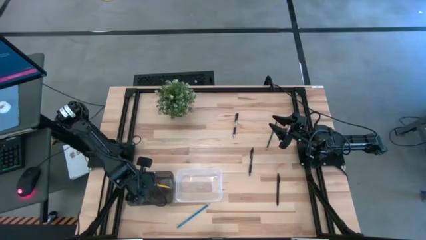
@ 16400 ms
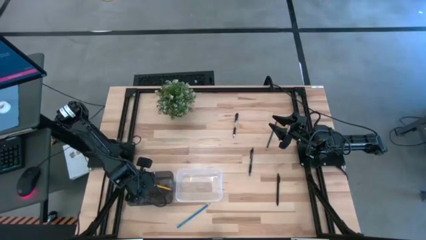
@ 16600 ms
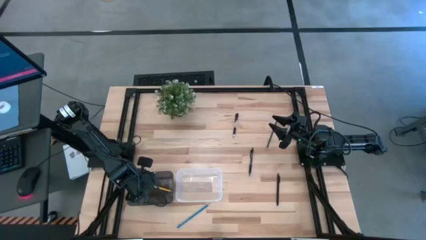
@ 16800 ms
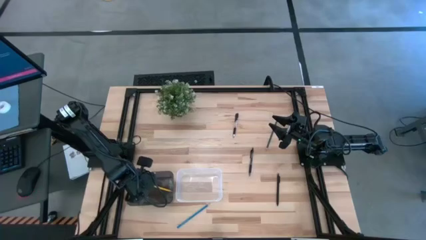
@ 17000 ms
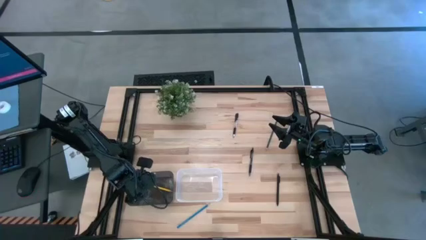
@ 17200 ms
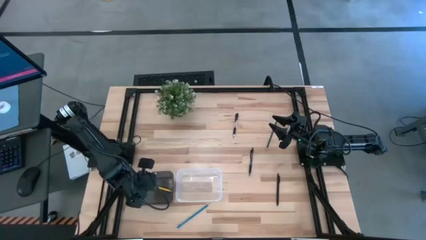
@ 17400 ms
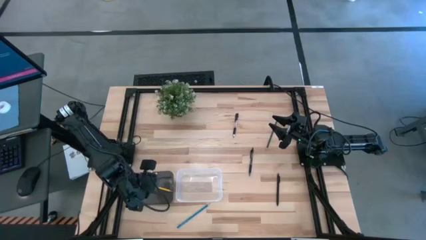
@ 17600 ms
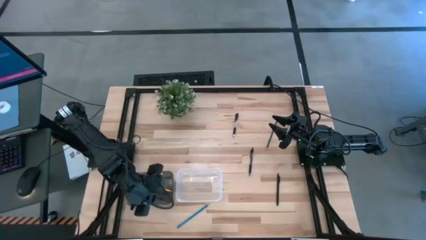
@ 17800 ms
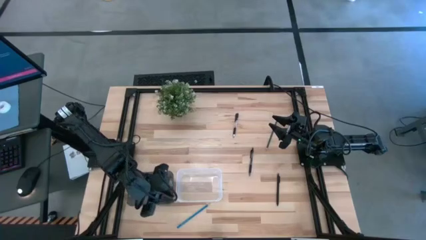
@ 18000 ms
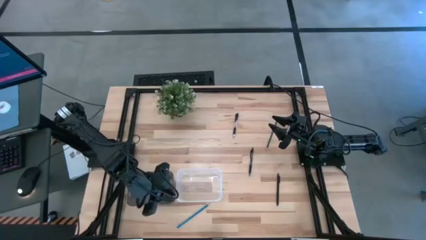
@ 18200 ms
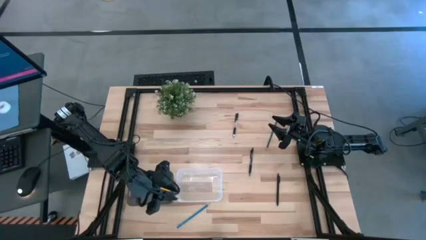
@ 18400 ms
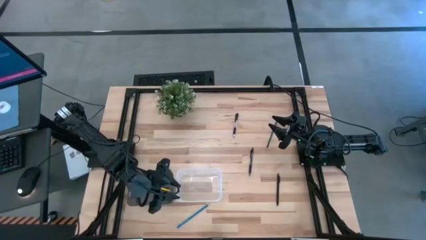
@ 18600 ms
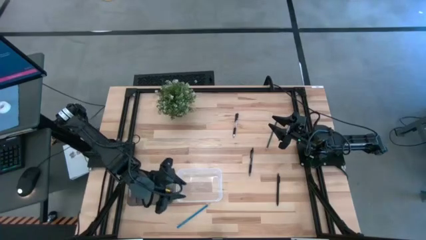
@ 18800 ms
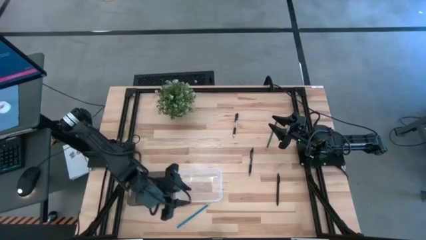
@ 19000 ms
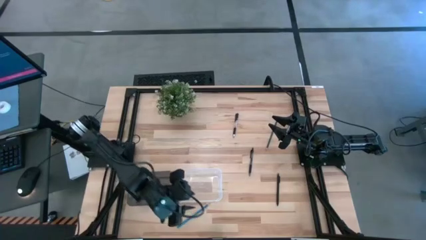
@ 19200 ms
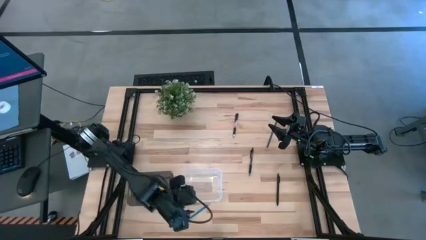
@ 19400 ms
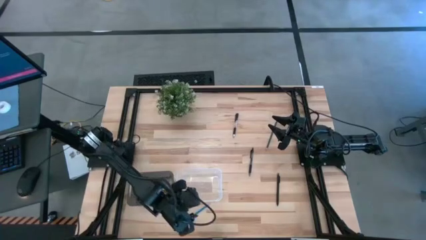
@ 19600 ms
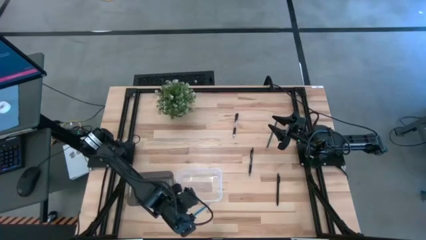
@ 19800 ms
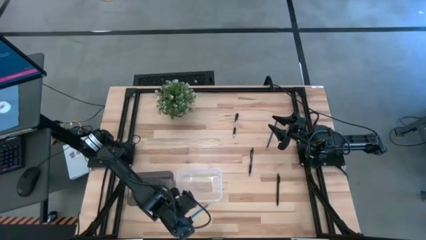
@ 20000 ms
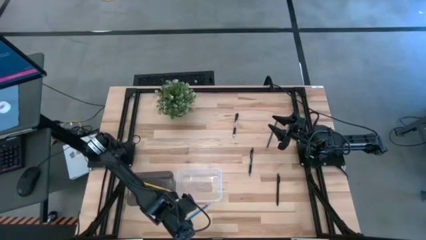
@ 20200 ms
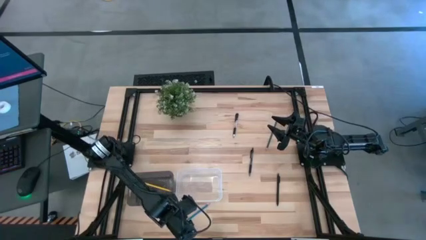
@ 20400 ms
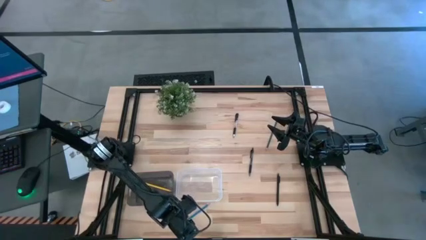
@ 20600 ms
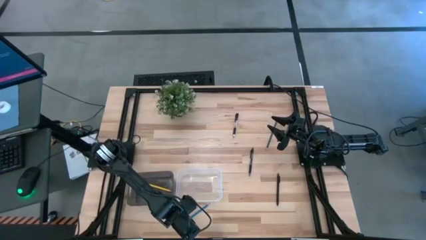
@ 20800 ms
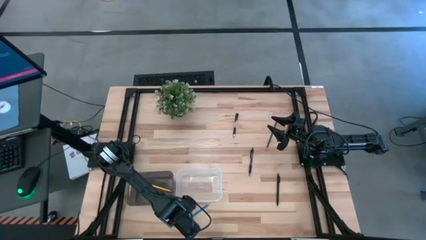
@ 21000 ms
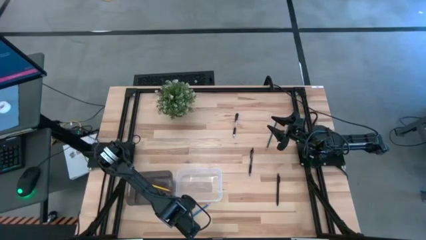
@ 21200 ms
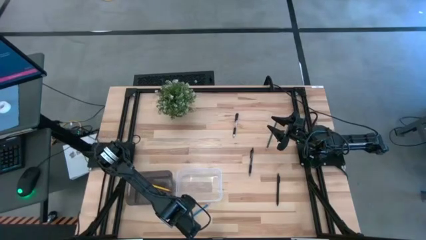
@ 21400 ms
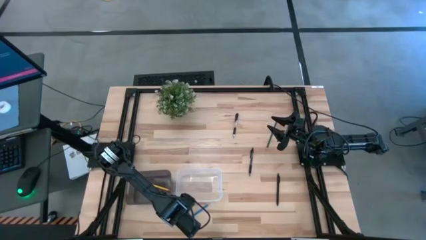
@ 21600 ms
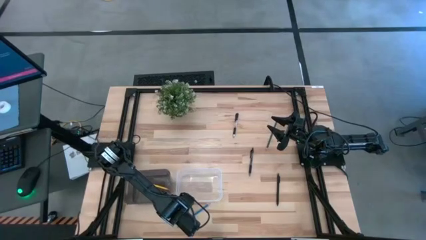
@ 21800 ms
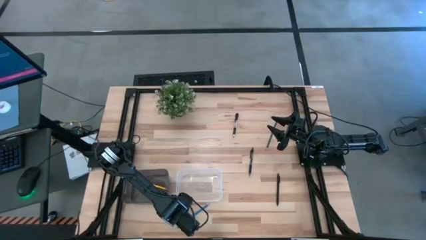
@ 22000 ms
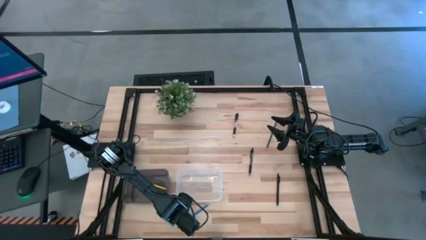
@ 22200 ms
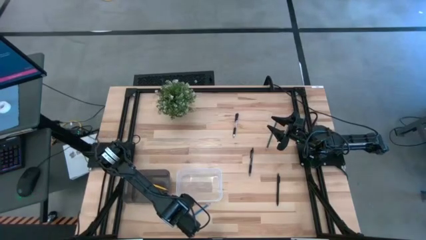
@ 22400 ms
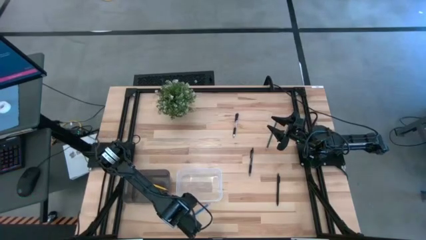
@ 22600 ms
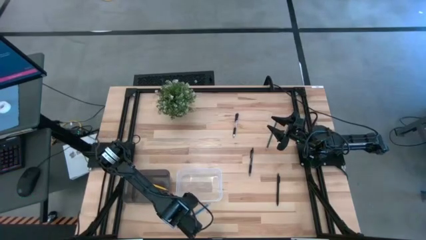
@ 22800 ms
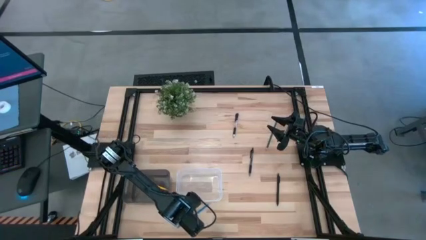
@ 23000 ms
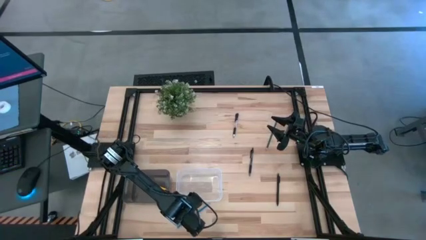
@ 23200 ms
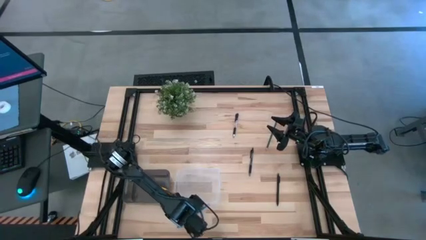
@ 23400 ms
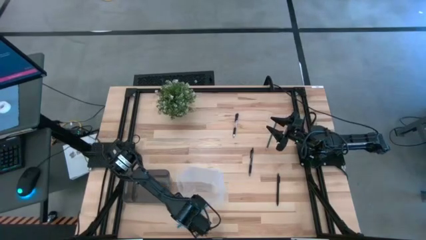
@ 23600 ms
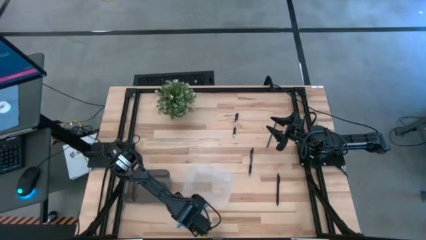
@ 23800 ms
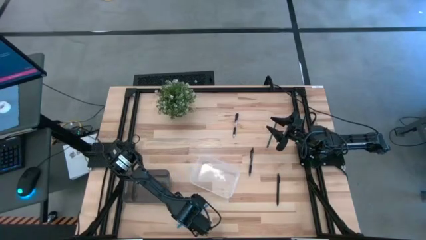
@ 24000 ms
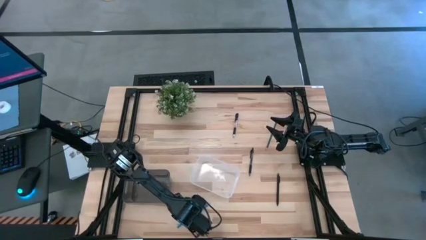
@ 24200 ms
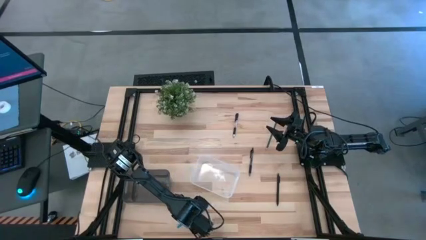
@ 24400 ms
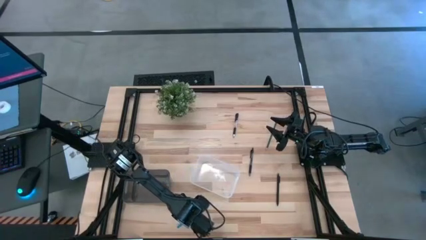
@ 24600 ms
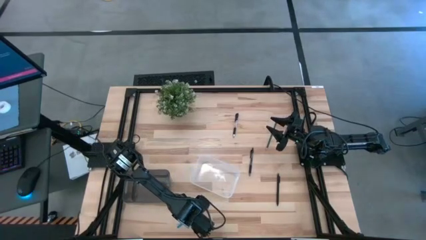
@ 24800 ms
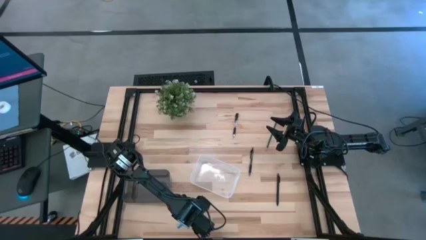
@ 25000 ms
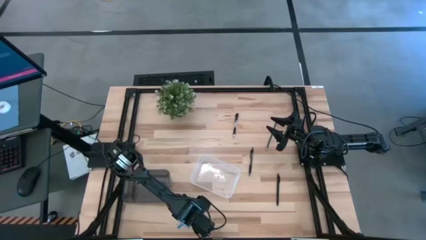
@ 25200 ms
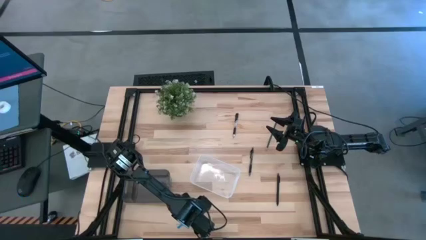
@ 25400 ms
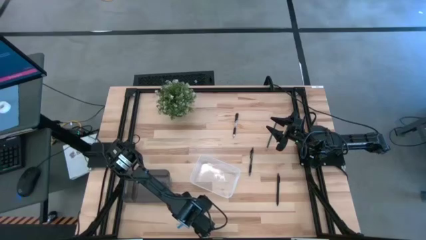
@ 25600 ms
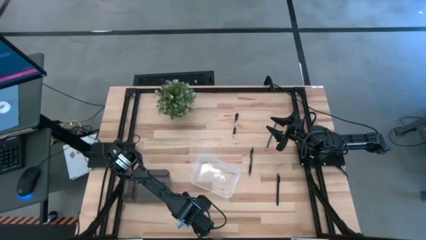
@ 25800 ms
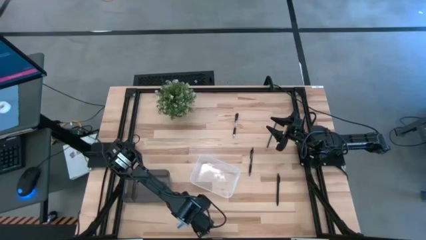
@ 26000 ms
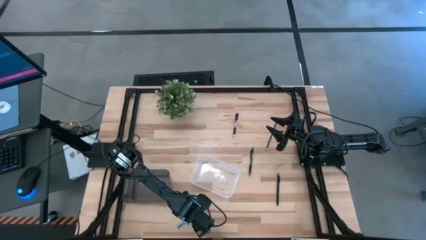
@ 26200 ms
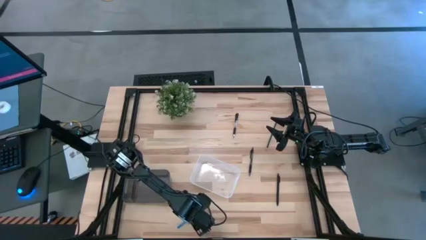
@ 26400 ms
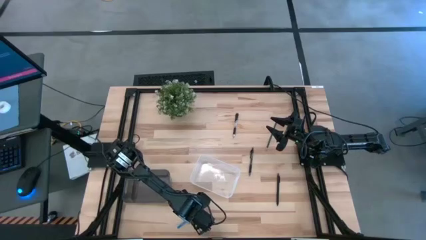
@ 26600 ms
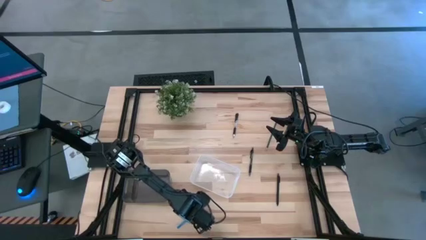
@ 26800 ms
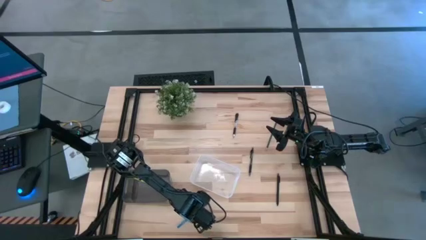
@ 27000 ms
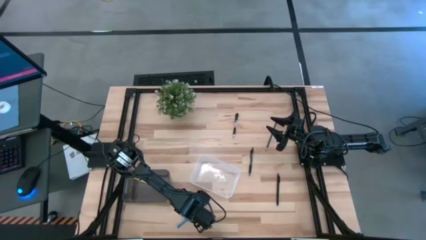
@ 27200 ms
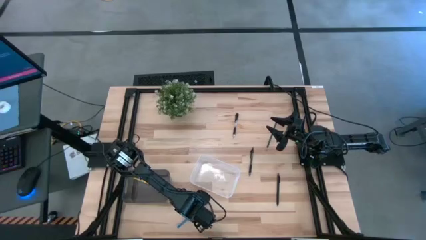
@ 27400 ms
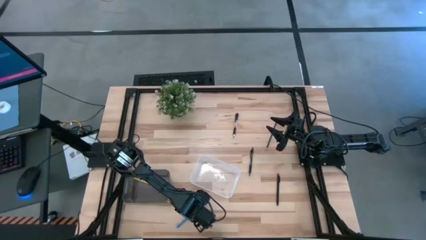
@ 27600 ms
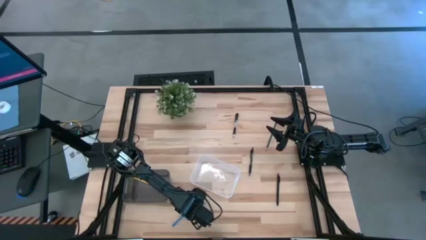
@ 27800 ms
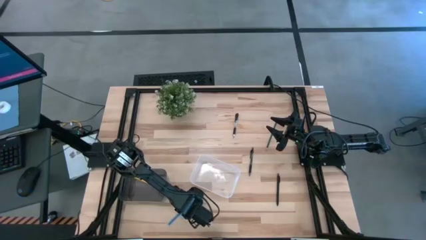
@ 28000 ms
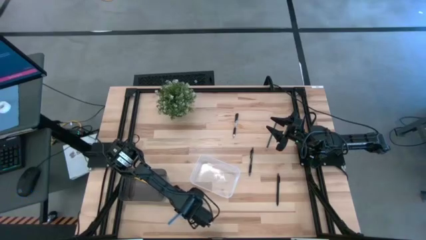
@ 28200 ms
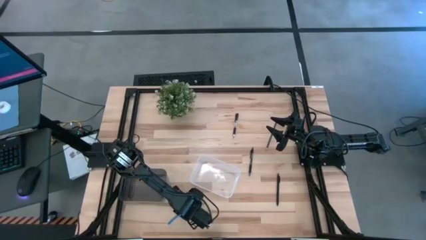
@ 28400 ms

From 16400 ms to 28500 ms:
Task: Sort pens & pencils
Put the blue pencil into the black bin
